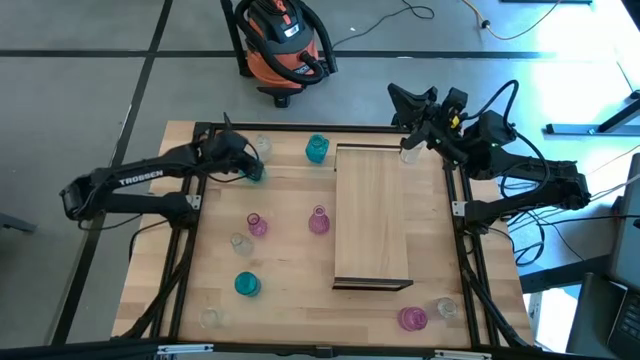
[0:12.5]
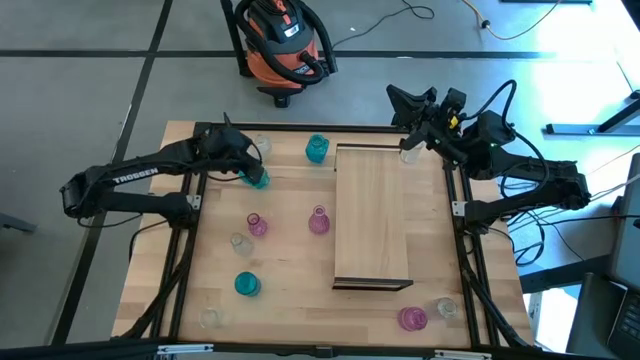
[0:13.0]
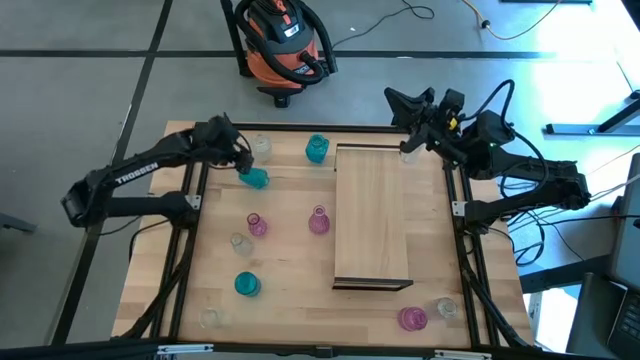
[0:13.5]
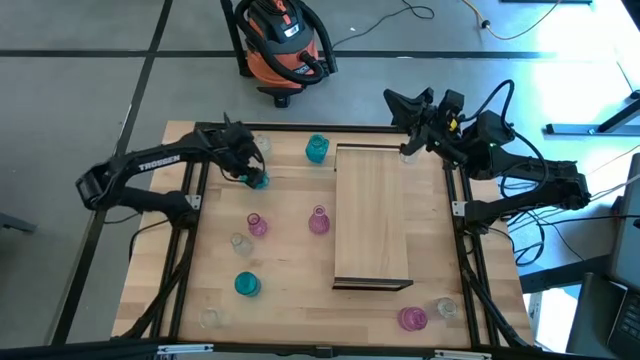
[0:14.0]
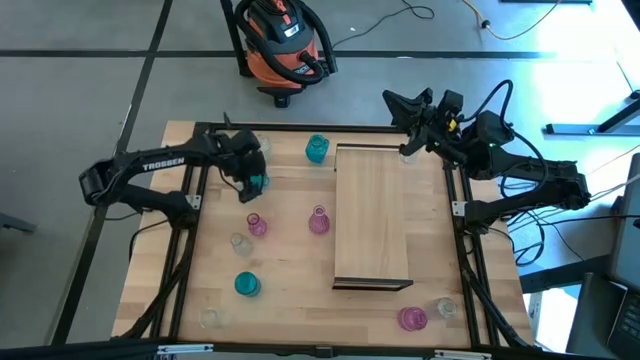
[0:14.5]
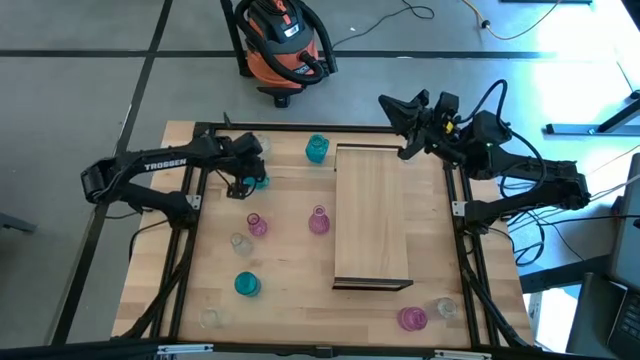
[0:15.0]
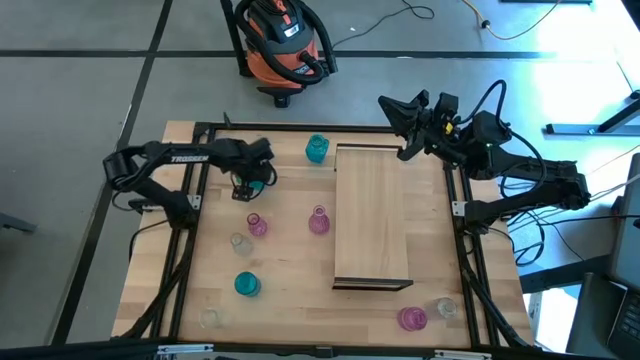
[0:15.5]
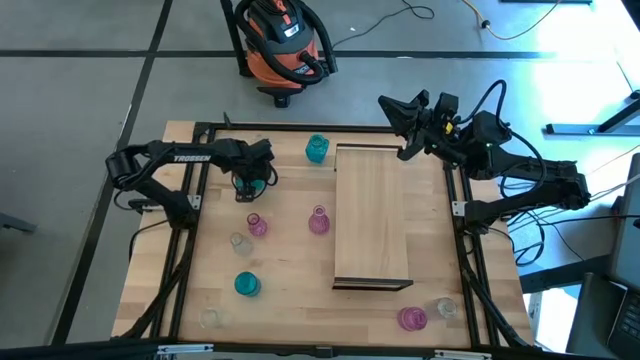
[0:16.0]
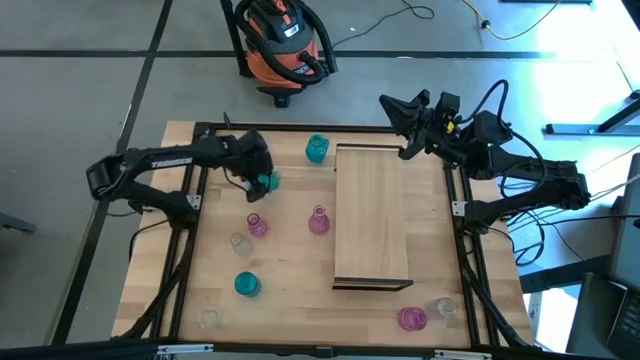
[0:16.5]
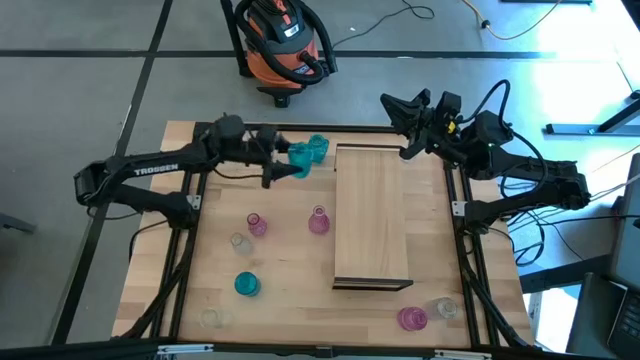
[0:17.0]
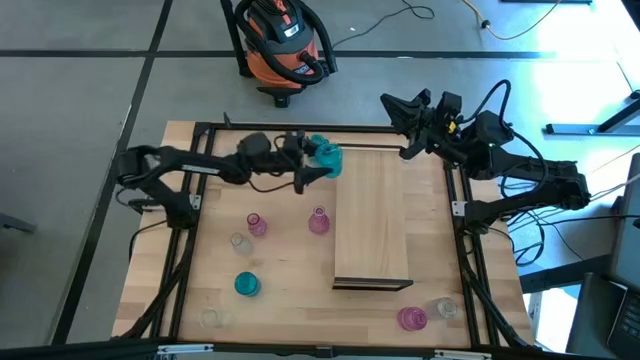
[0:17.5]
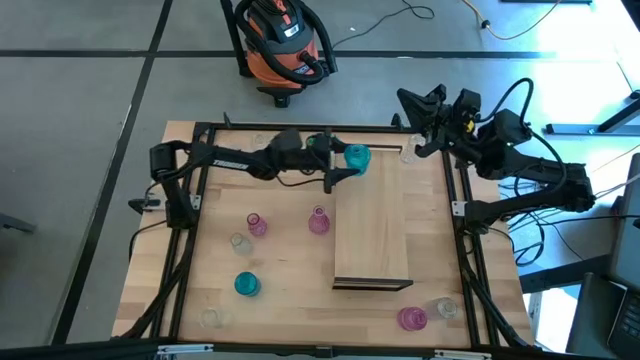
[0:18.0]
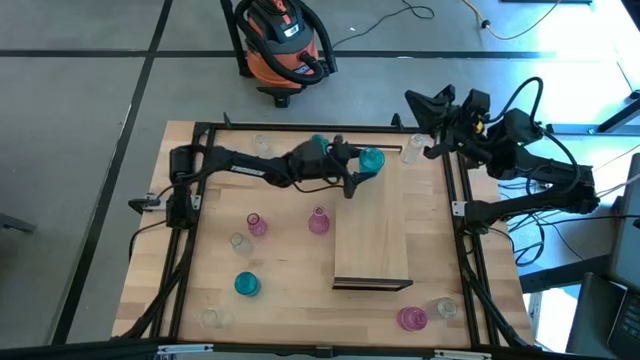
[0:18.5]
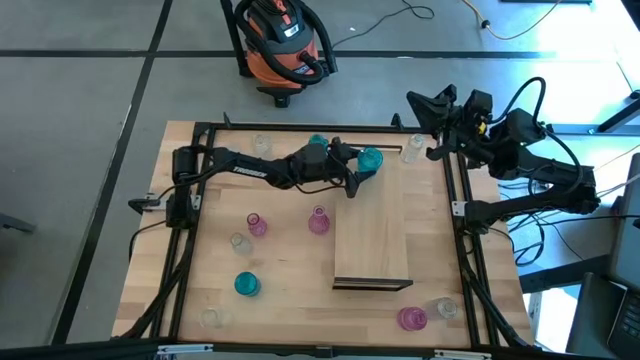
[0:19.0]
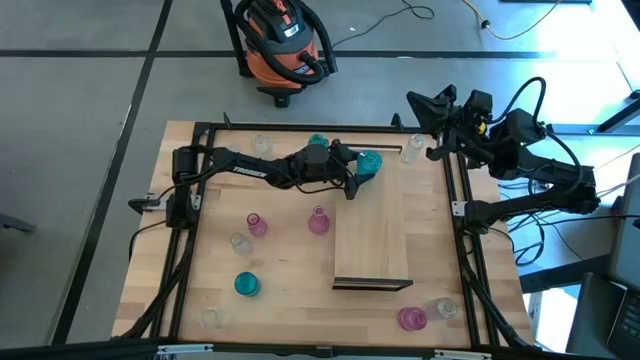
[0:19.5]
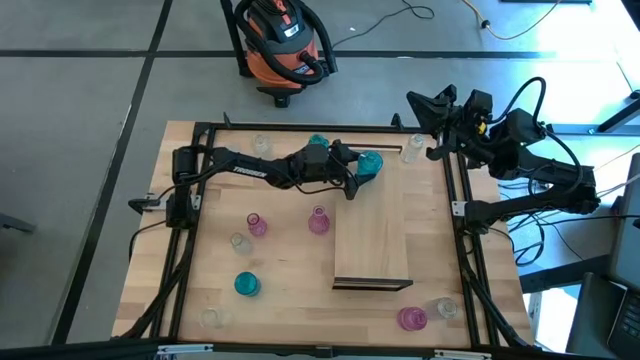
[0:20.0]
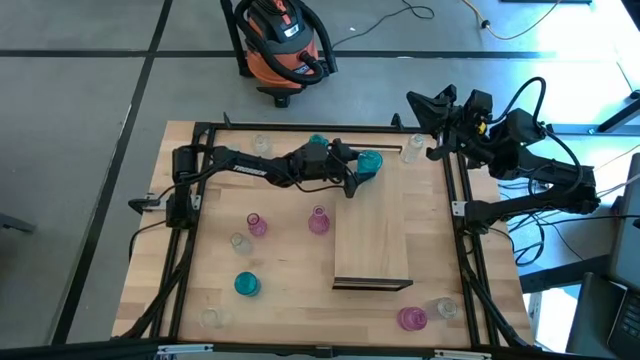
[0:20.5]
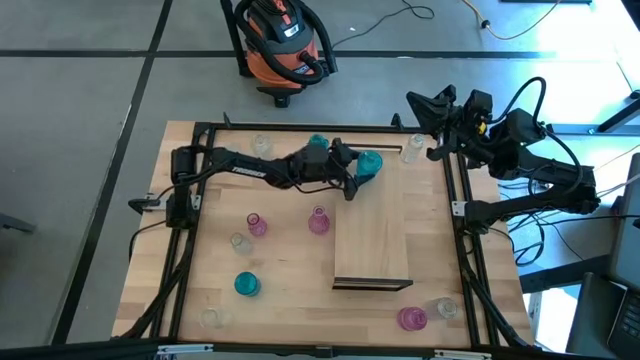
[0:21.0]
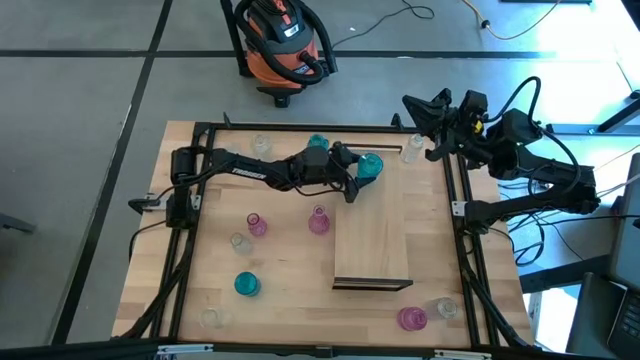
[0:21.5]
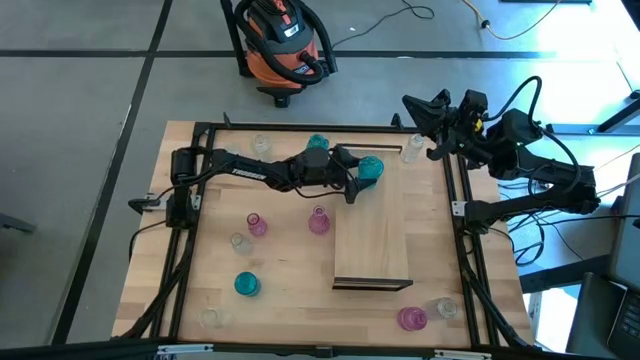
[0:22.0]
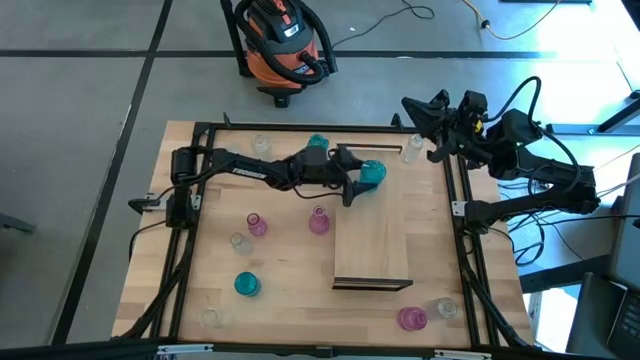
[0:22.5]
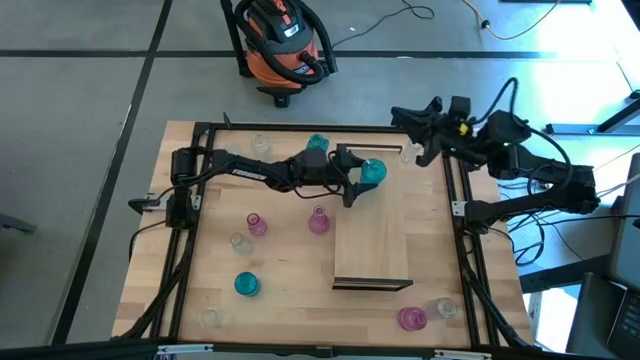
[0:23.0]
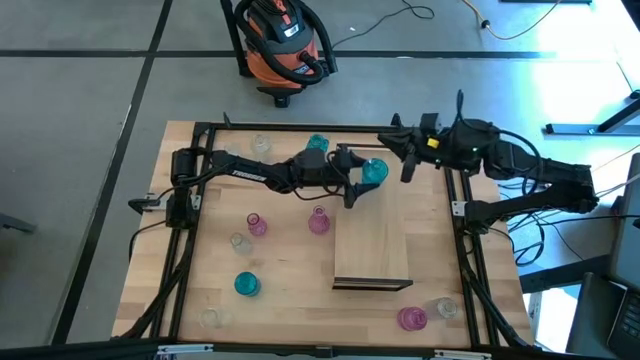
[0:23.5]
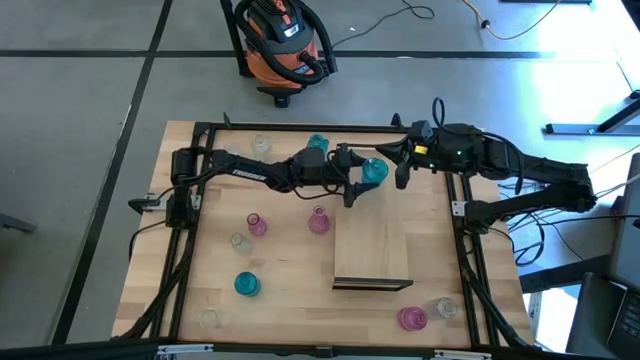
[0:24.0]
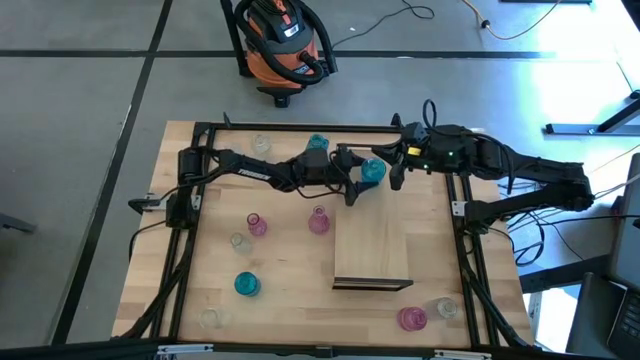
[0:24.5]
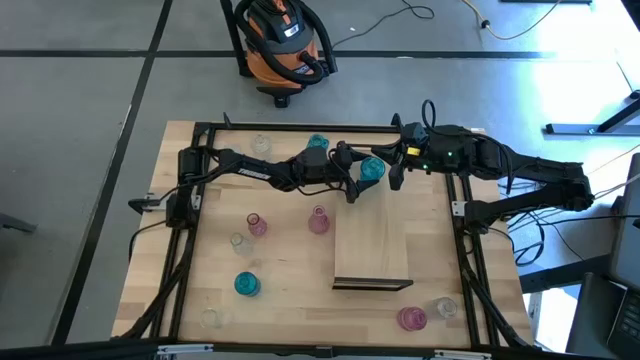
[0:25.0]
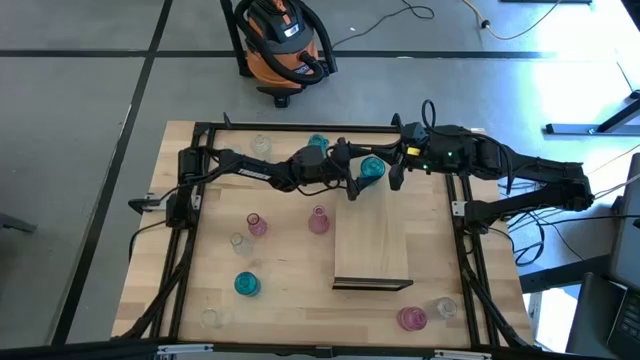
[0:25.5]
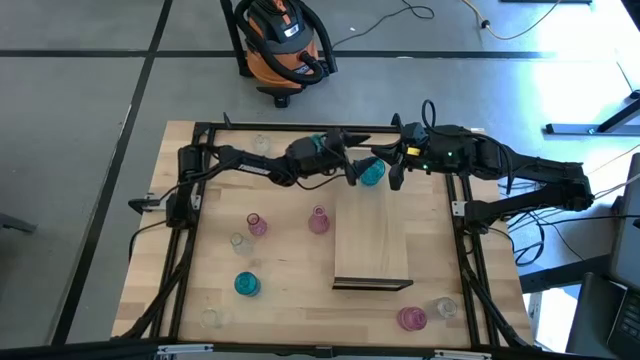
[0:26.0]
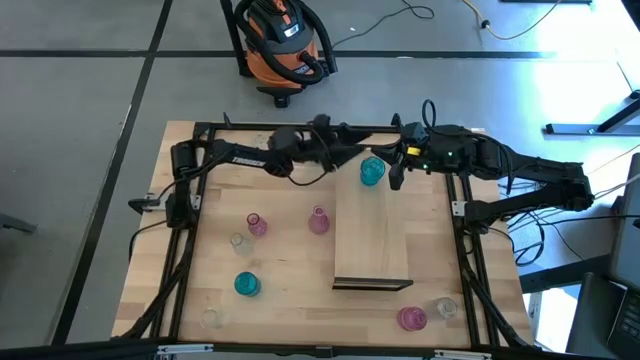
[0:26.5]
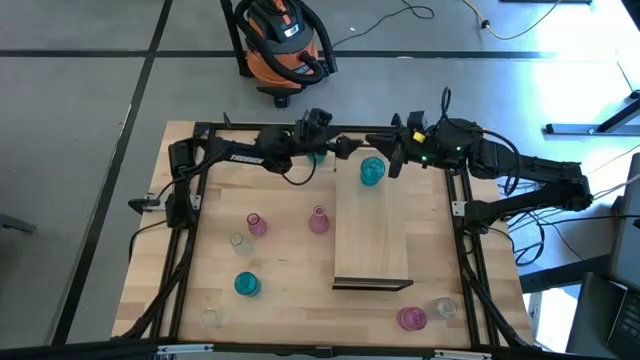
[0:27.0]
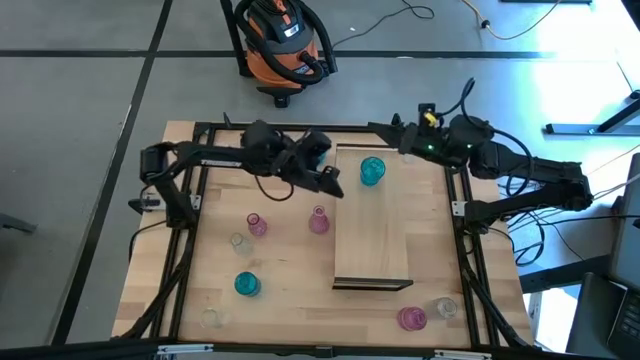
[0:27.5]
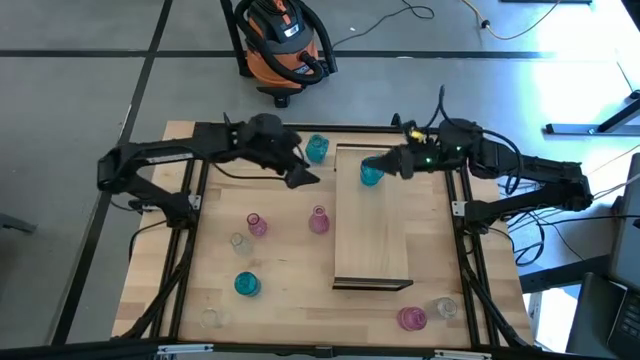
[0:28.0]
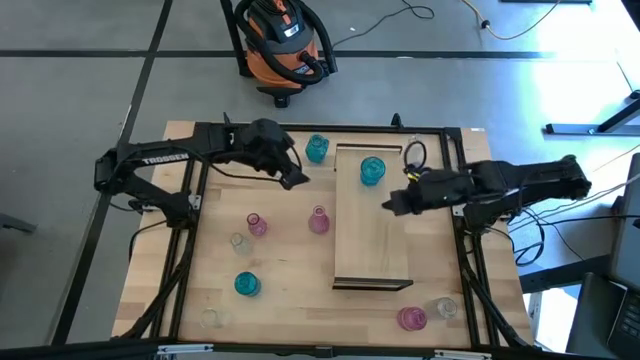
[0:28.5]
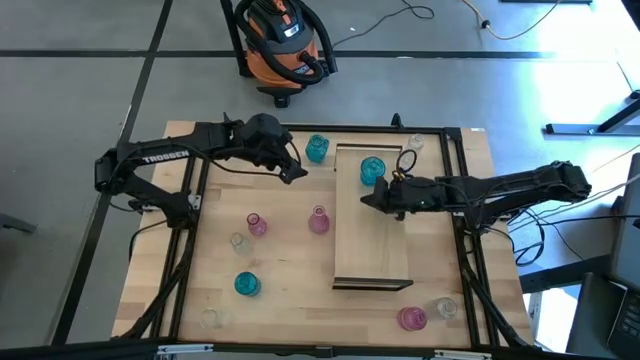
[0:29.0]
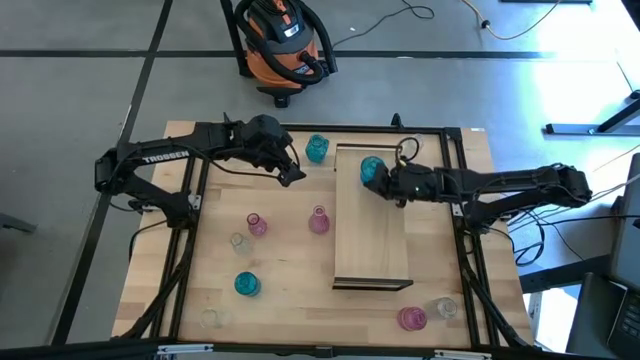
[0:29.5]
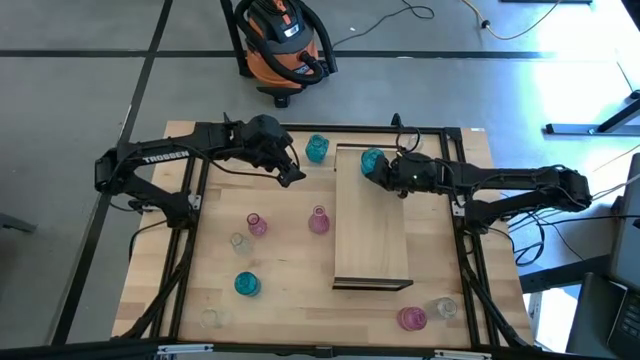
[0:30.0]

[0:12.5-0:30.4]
Task: sort vases onto shelf
Put the blue vase on the shelf
